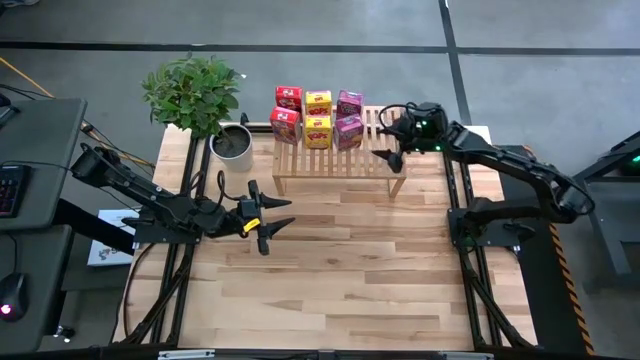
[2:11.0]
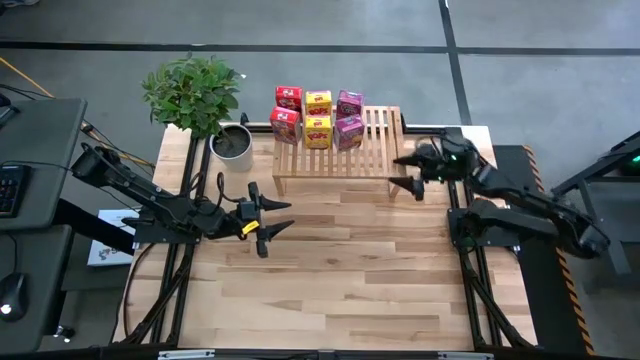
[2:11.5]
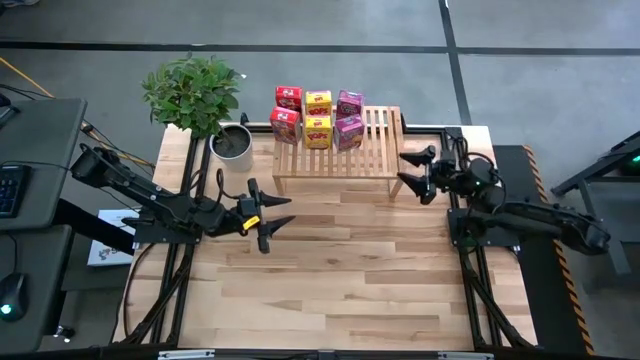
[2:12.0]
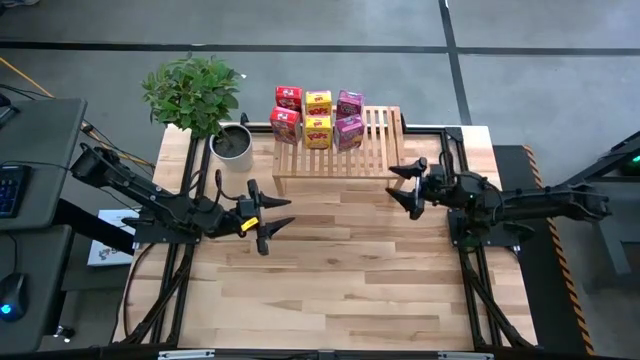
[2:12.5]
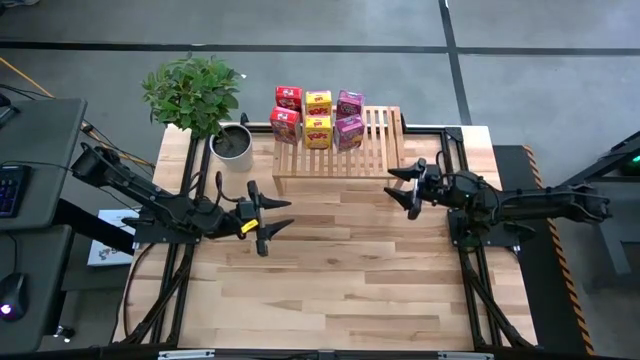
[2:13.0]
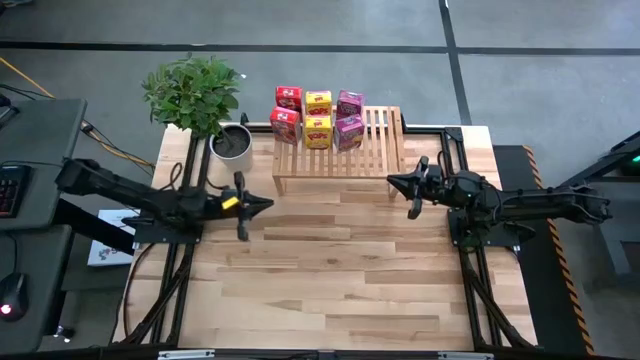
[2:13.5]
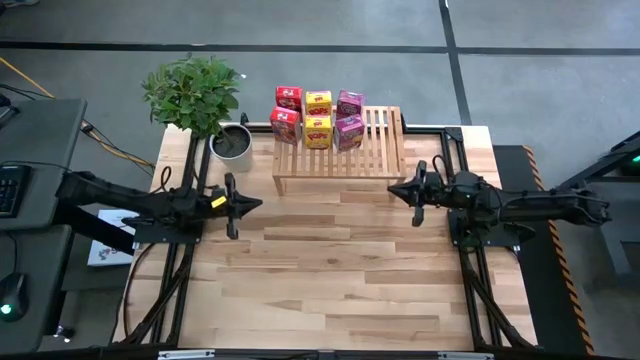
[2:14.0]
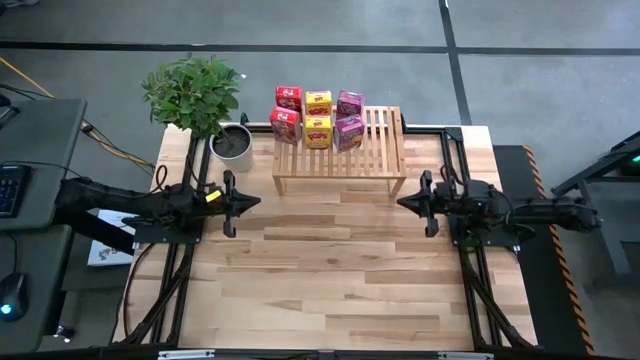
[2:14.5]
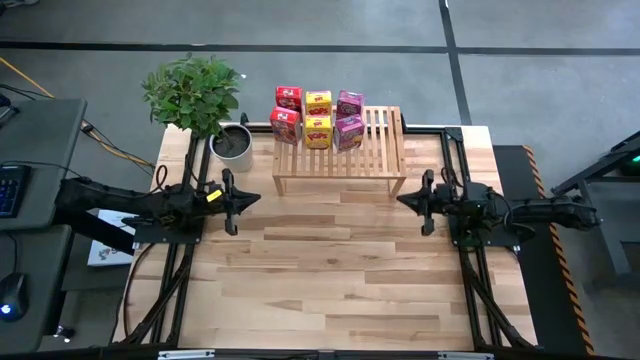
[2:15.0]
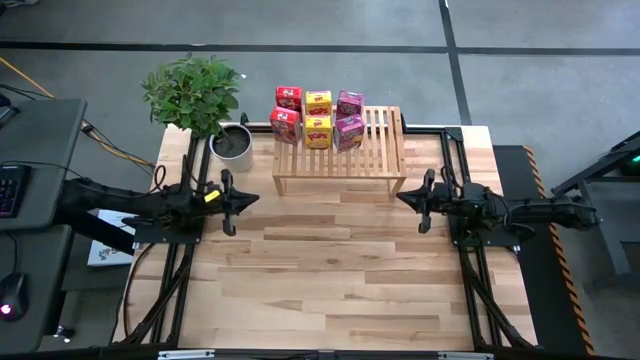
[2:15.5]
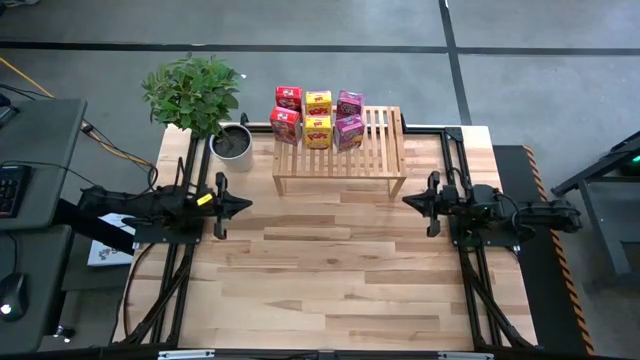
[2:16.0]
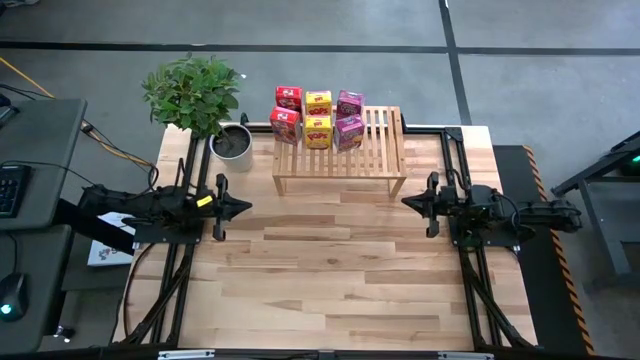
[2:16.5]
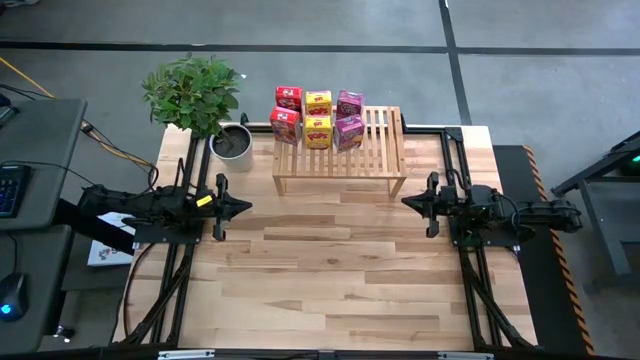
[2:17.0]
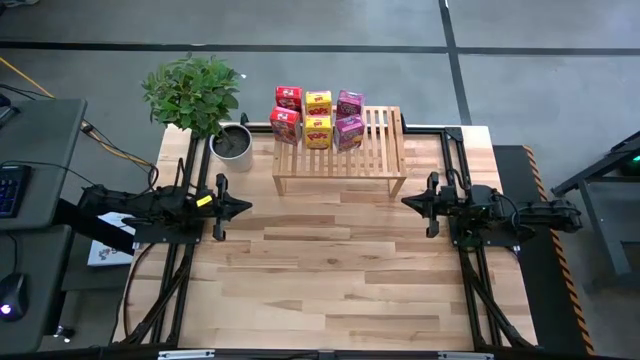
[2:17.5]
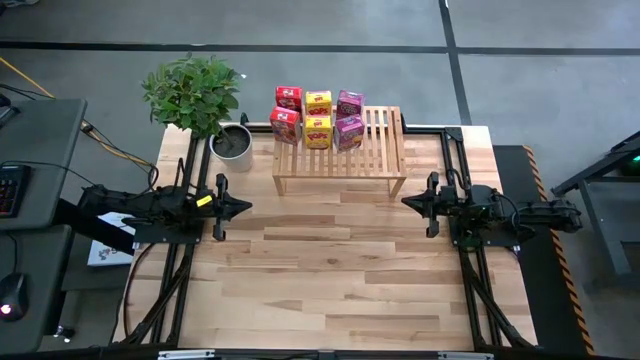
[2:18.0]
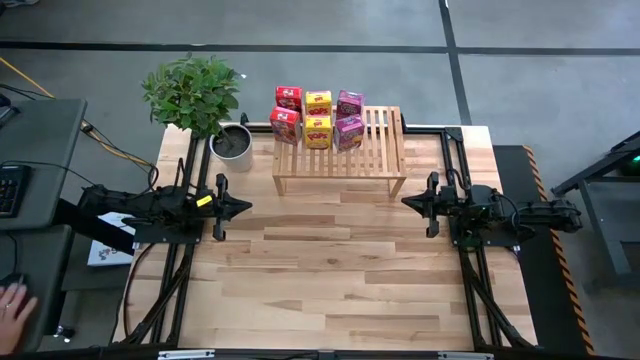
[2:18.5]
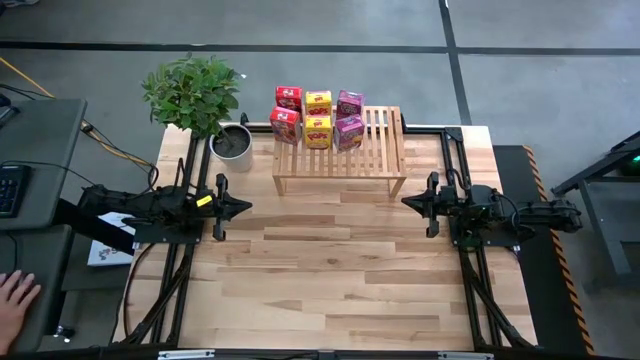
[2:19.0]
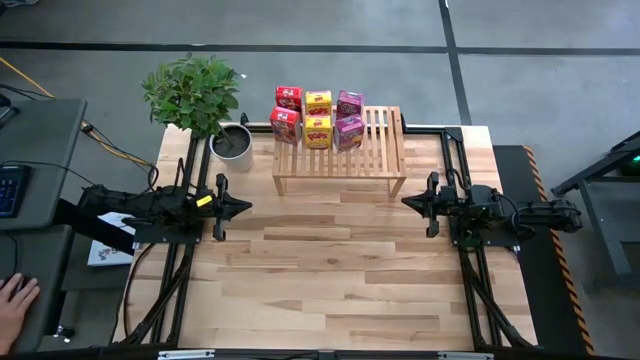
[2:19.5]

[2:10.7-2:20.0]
Task: Stack cereal on shelf
Return to Home Position

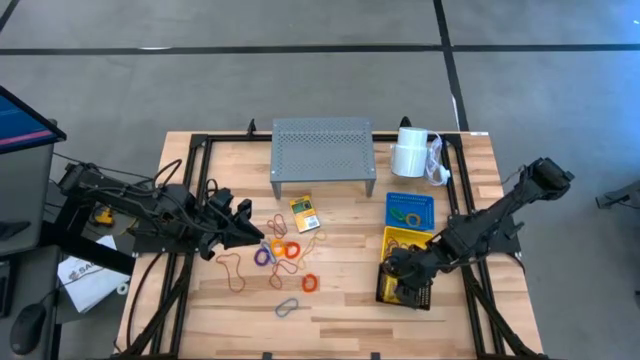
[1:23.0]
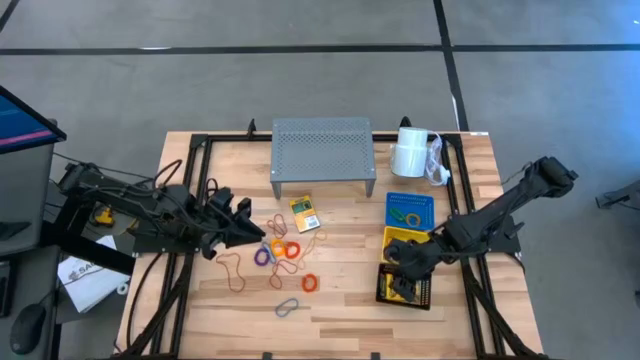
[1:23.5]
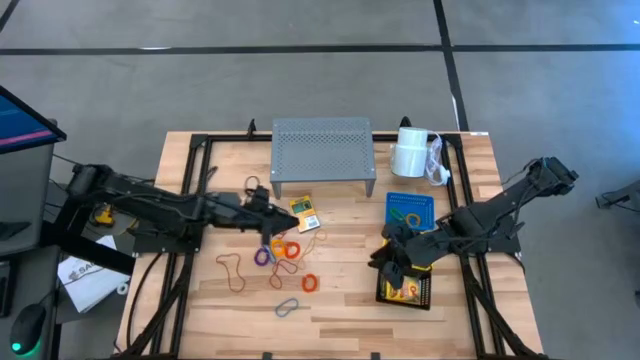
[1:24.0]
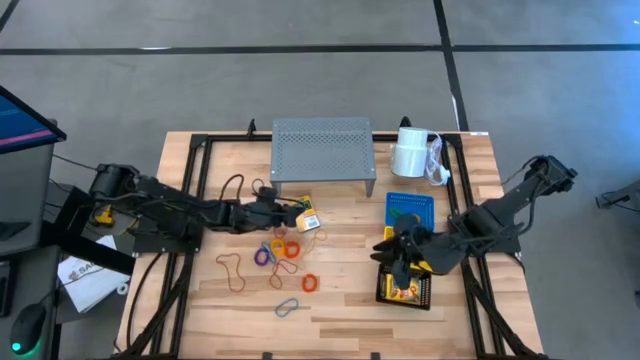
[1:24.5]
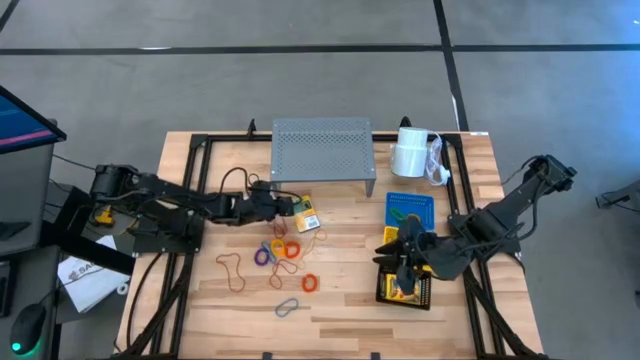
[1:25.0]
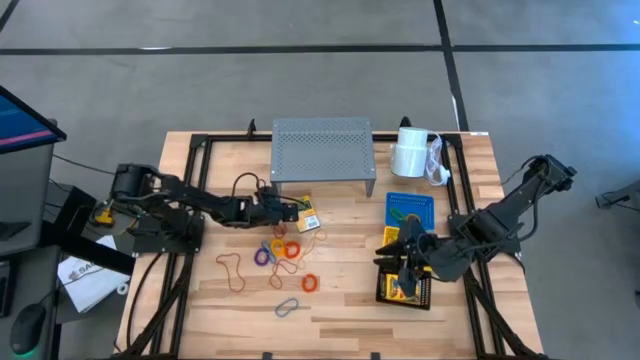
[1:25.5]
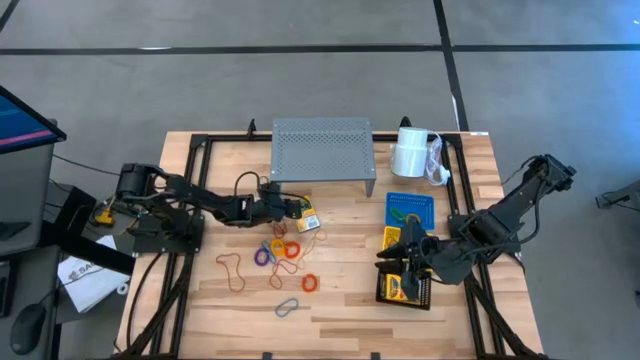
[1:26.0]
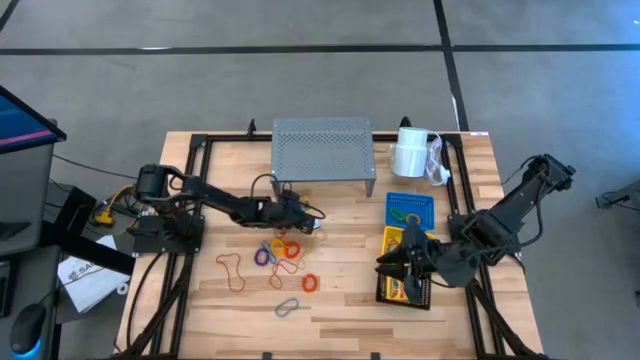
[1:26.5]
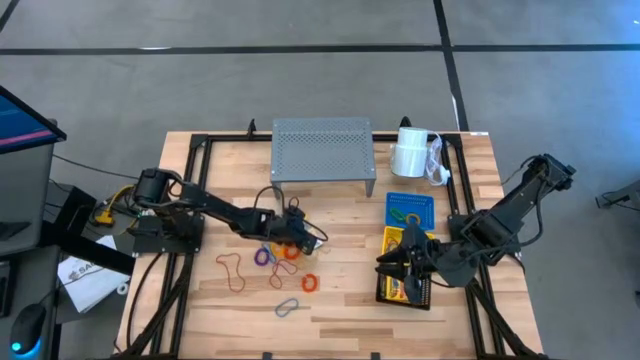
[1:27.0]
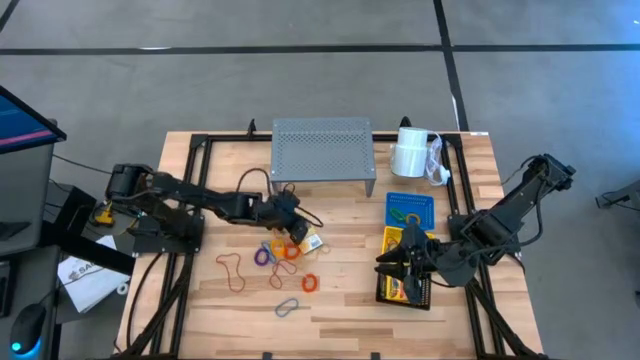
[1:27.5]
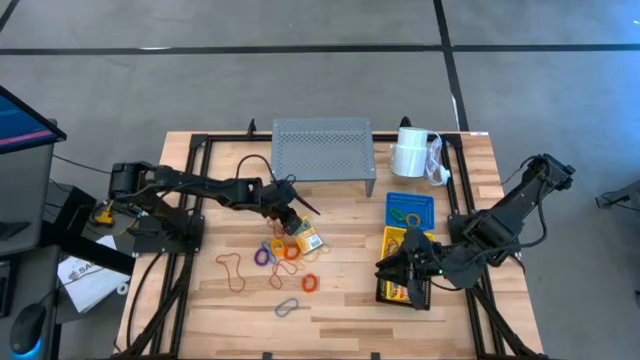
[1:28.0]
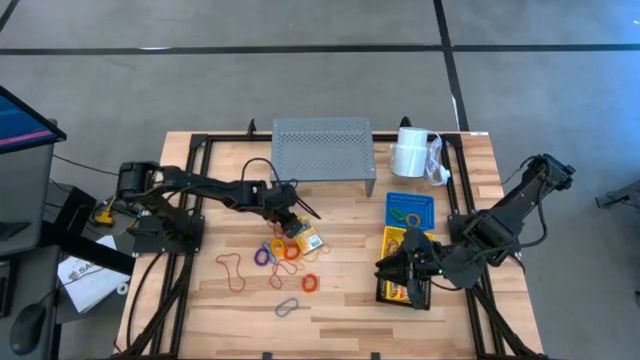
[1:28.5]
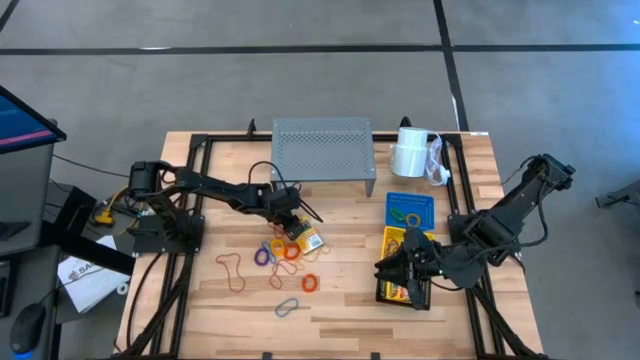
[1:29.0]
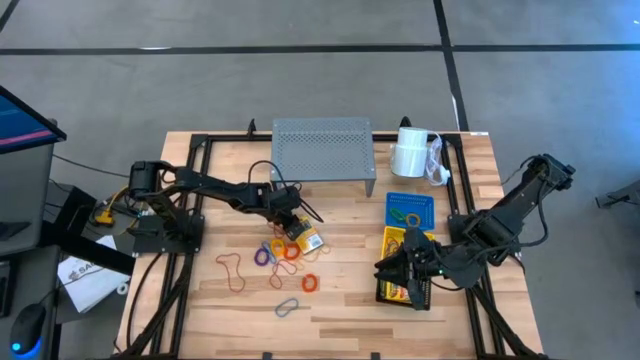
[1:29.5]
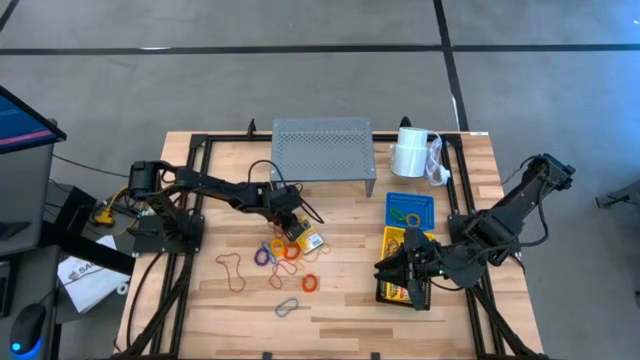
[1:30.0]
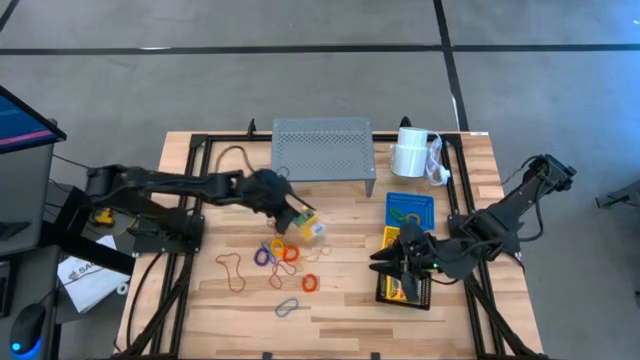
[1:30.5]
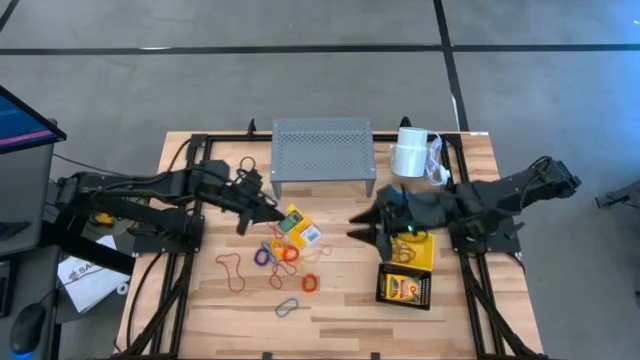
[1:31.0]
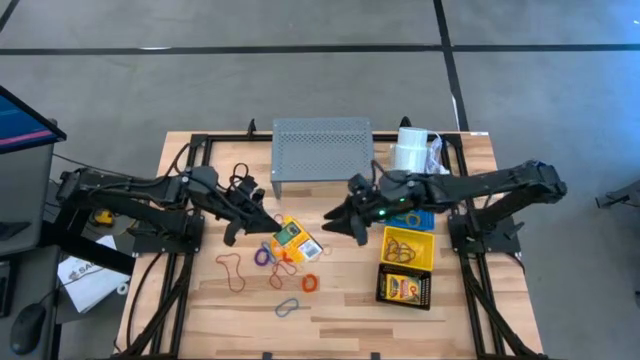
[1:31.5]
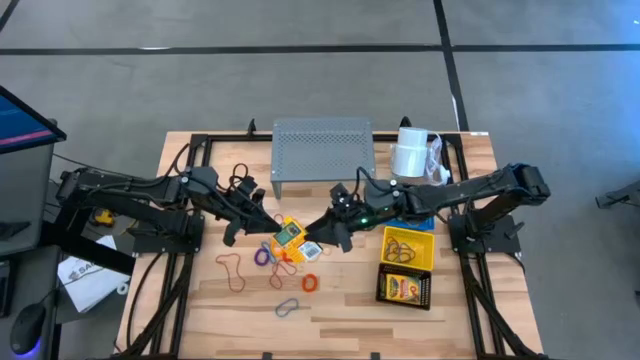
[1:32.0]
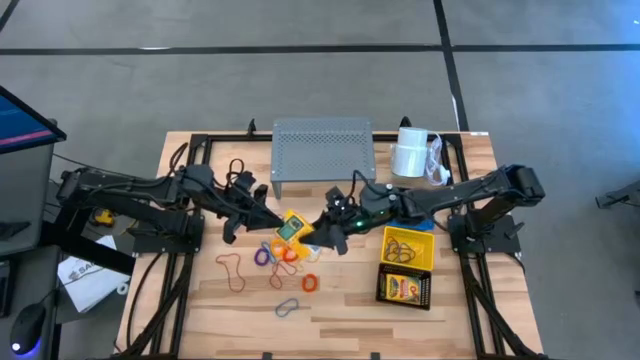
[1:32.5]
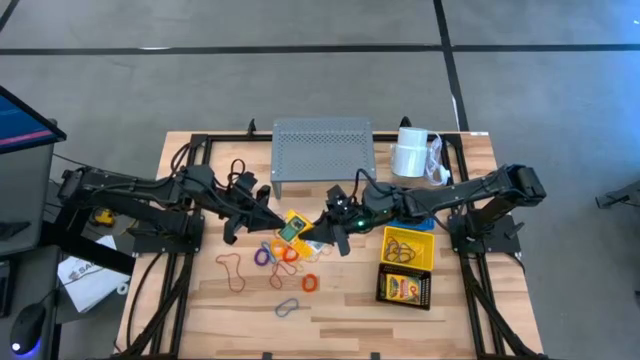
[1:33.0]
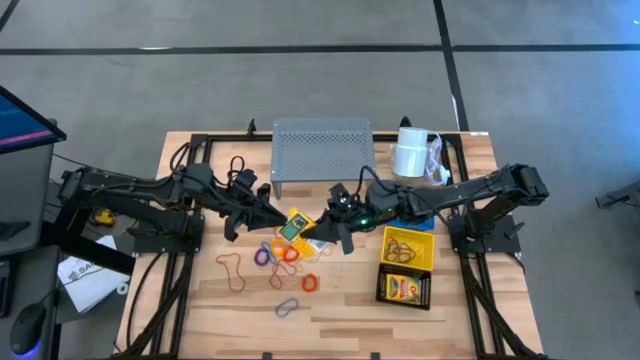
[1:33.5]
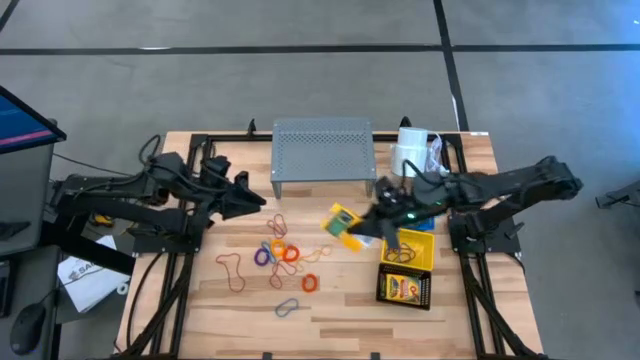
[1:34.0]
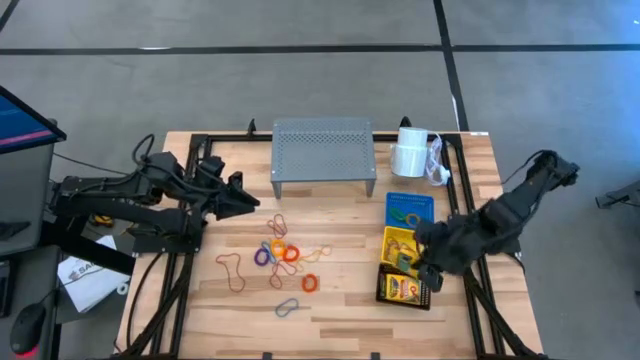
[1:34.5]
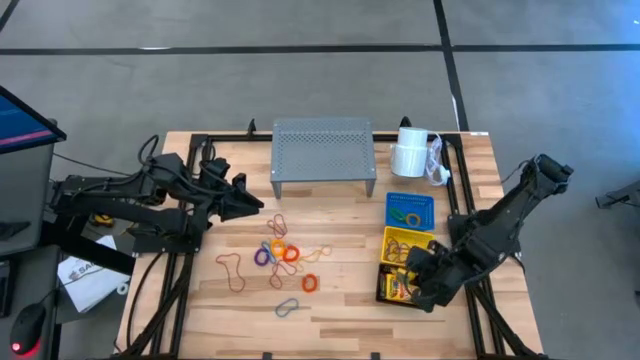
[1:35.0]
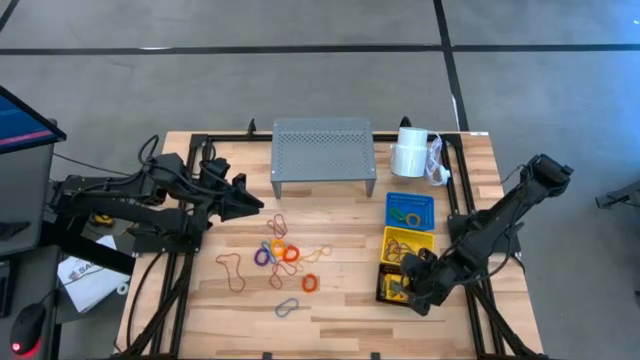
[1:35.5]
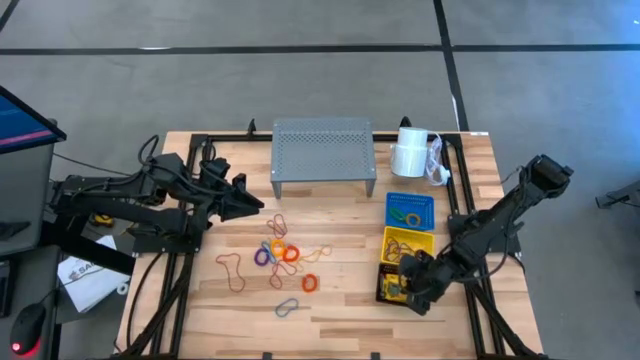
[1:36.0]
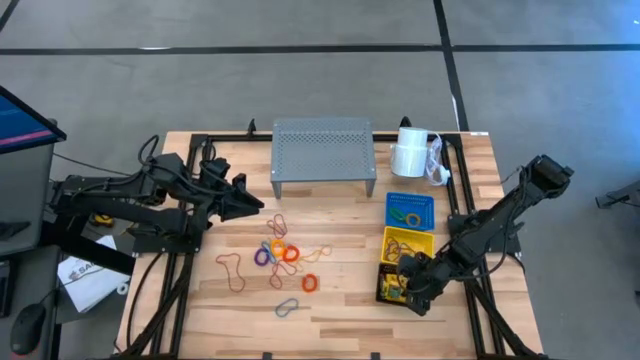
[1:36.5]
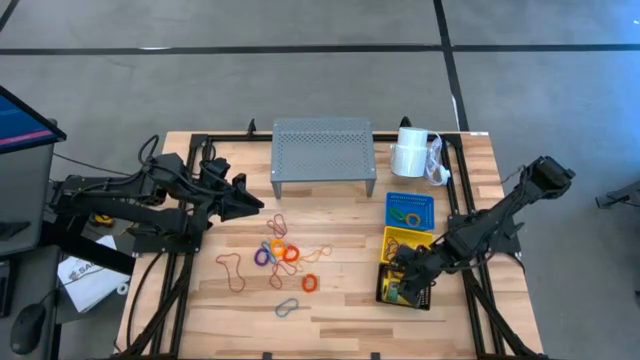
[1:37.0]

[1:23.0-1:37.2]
Task: Pick & Place Office Desk Supplies
Put the crayon box into the black basket
